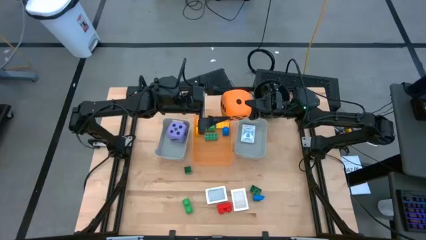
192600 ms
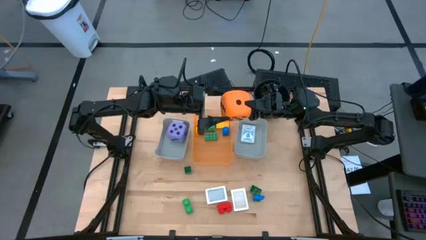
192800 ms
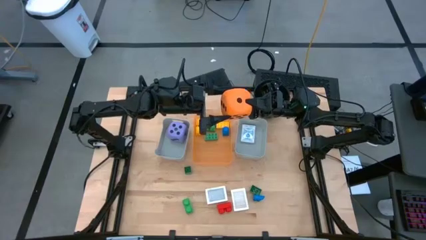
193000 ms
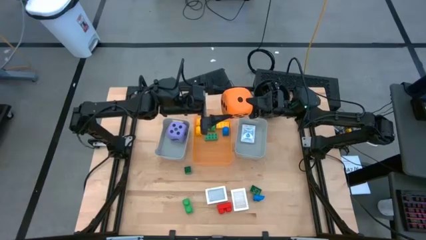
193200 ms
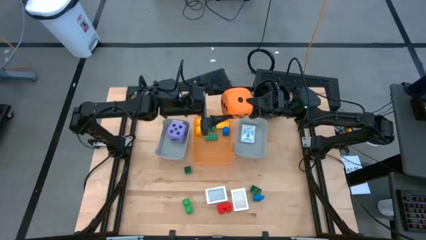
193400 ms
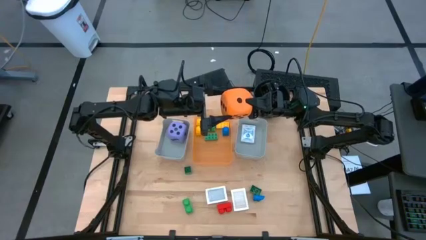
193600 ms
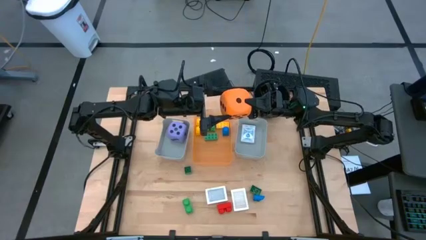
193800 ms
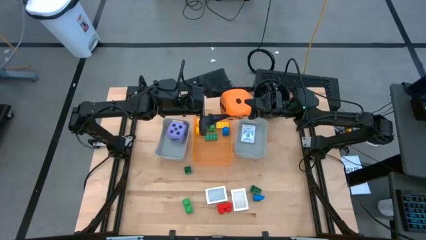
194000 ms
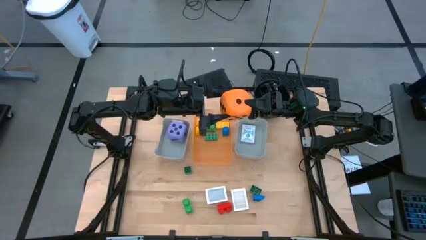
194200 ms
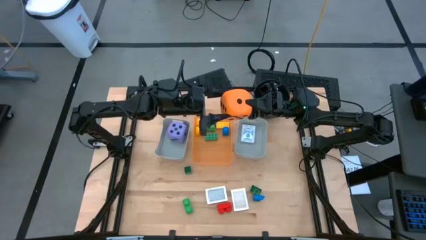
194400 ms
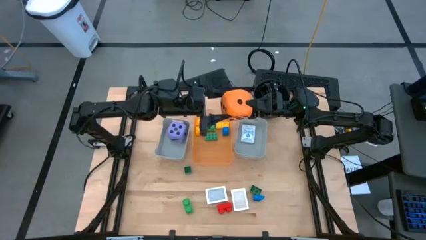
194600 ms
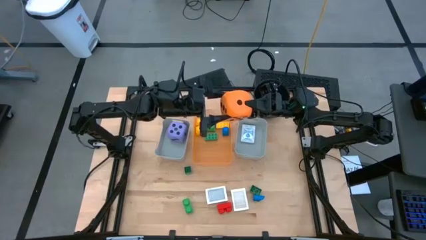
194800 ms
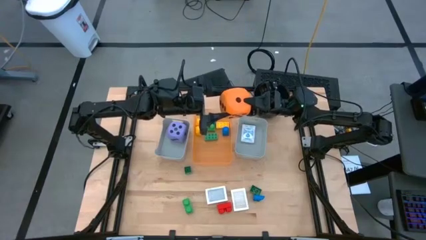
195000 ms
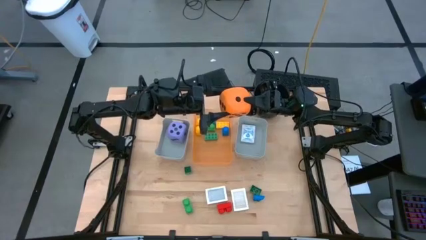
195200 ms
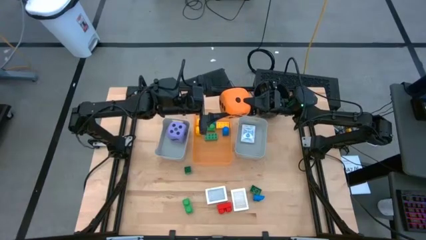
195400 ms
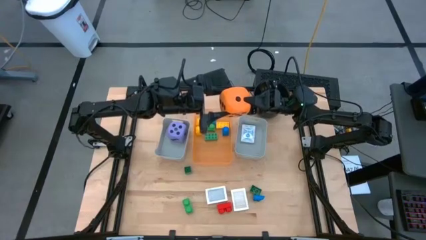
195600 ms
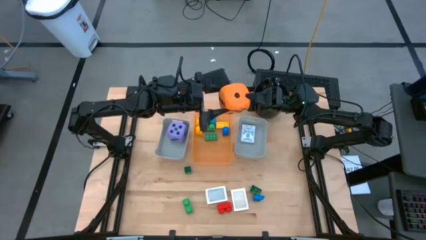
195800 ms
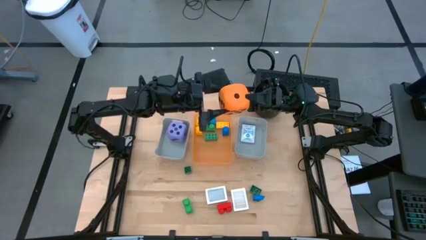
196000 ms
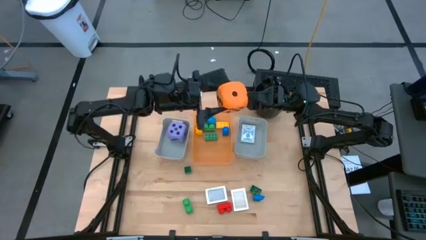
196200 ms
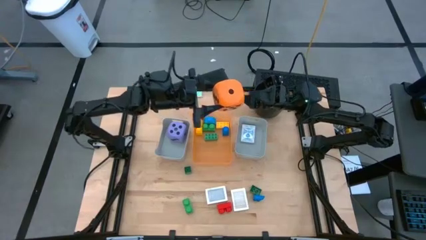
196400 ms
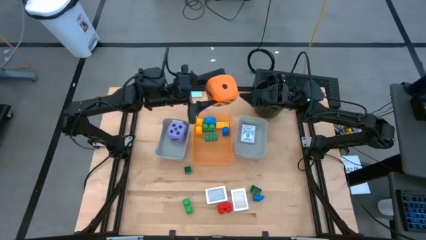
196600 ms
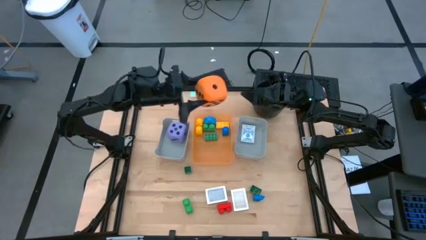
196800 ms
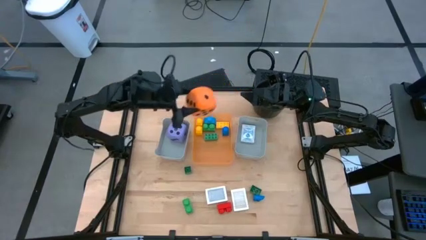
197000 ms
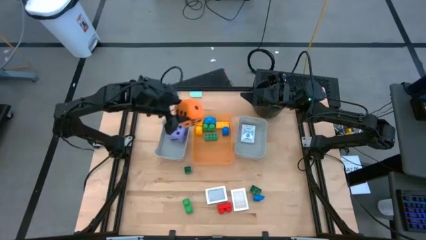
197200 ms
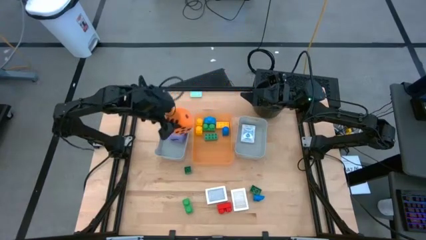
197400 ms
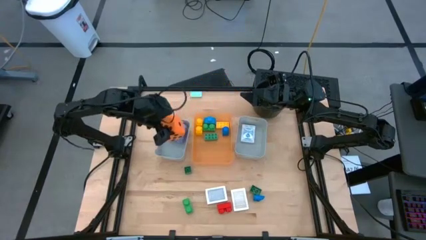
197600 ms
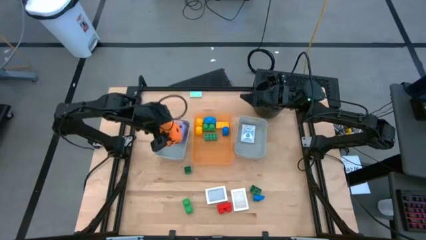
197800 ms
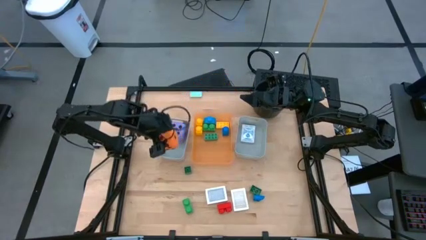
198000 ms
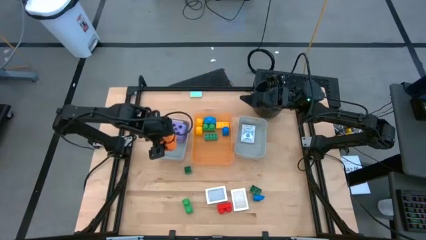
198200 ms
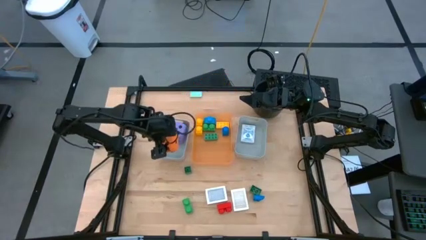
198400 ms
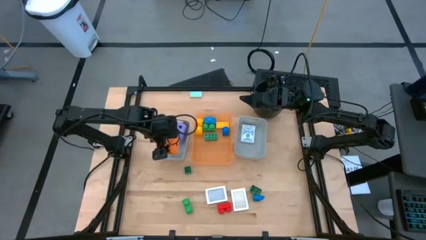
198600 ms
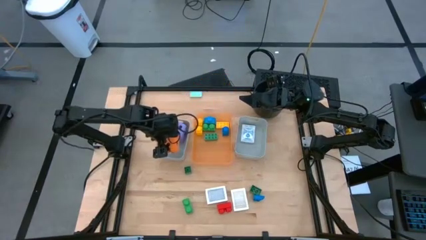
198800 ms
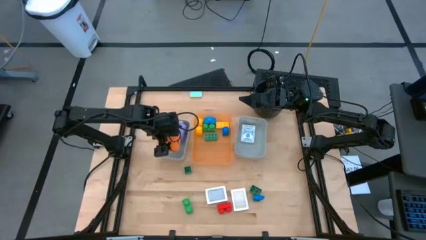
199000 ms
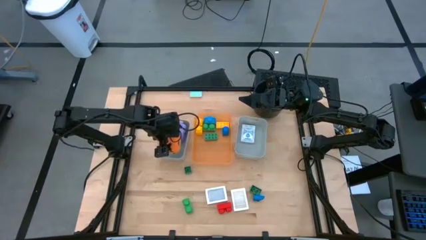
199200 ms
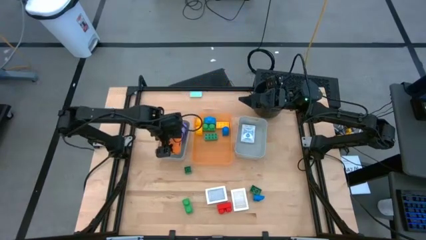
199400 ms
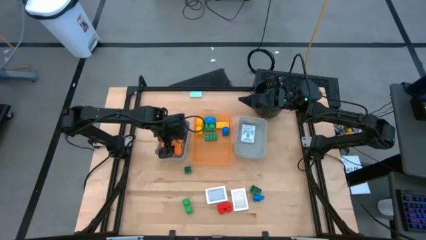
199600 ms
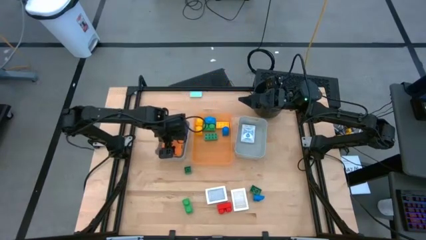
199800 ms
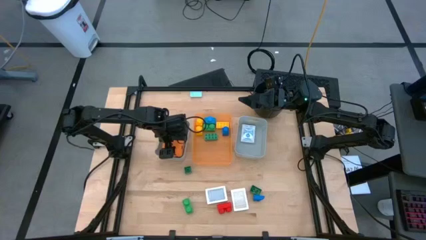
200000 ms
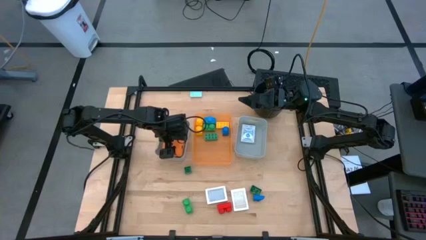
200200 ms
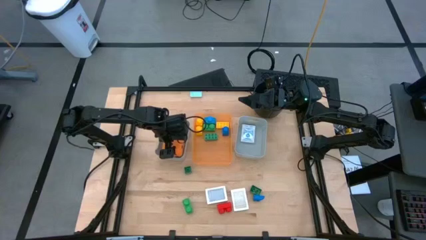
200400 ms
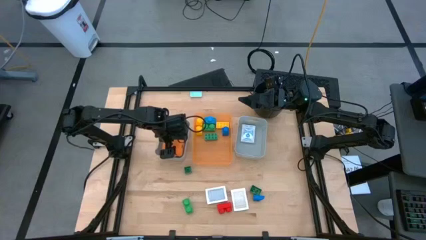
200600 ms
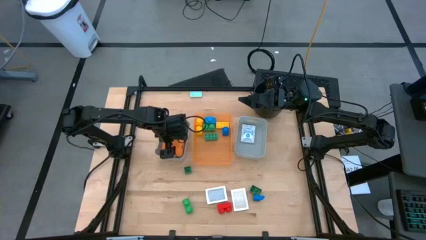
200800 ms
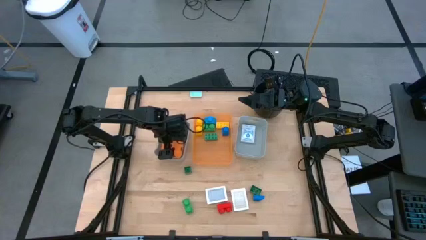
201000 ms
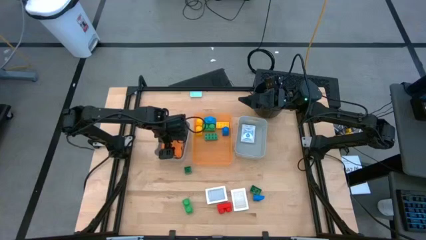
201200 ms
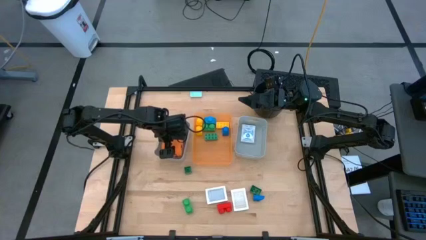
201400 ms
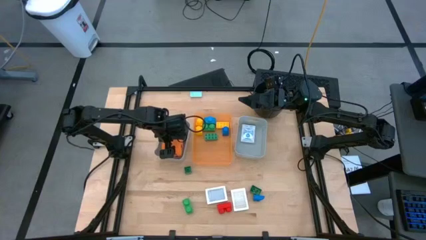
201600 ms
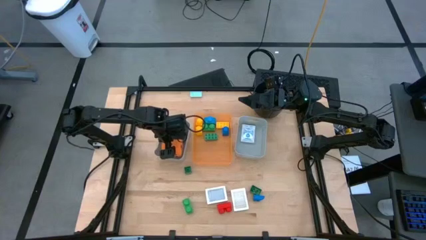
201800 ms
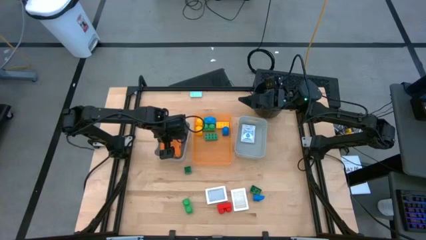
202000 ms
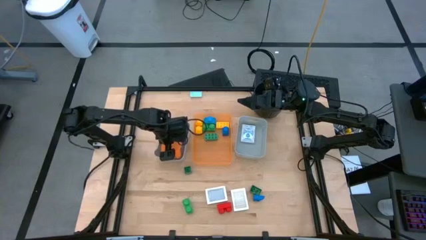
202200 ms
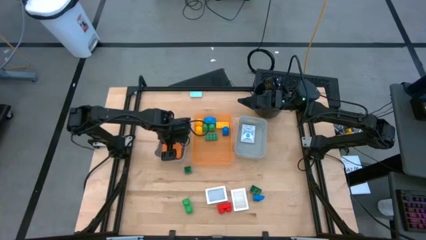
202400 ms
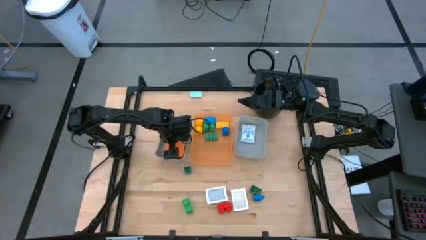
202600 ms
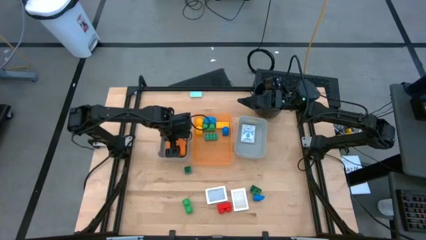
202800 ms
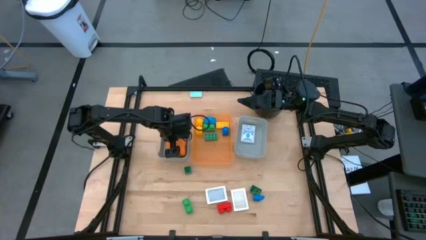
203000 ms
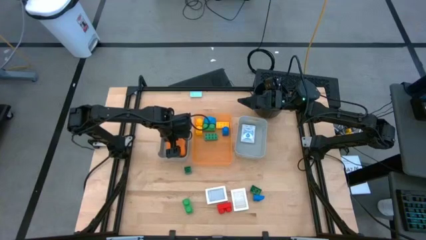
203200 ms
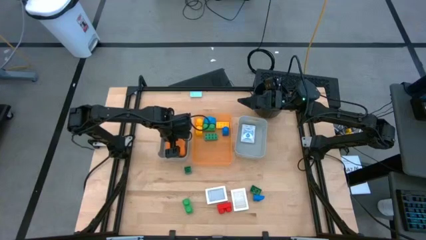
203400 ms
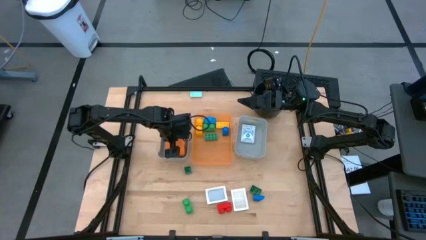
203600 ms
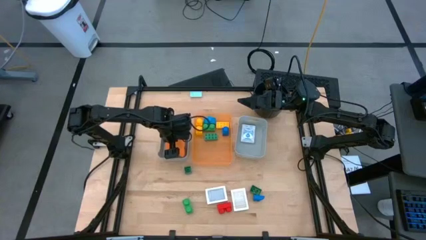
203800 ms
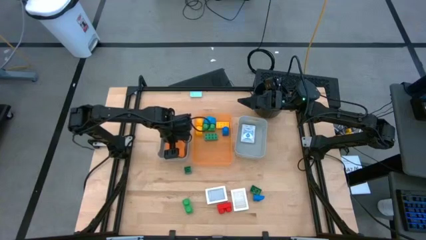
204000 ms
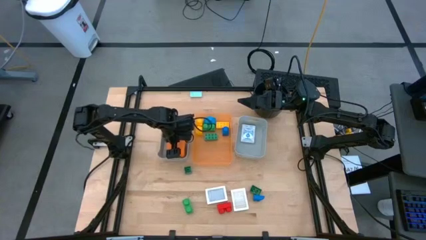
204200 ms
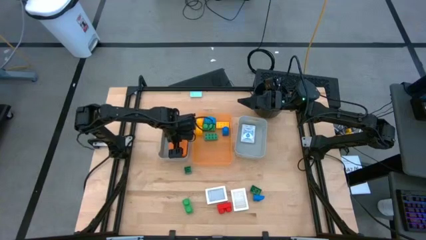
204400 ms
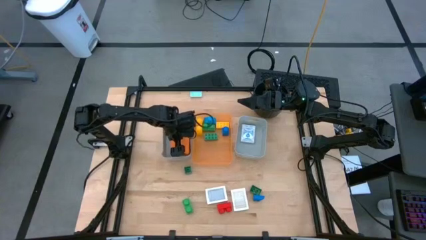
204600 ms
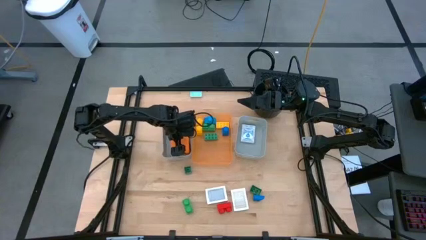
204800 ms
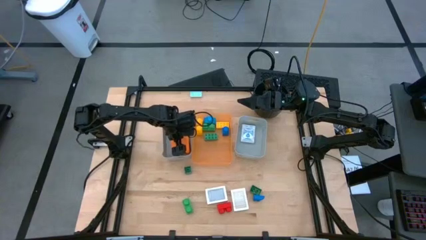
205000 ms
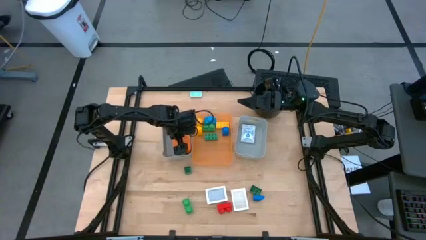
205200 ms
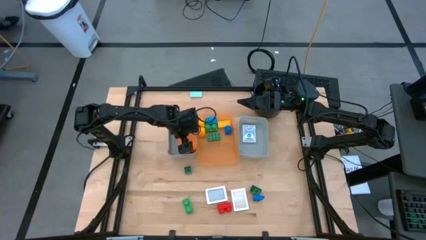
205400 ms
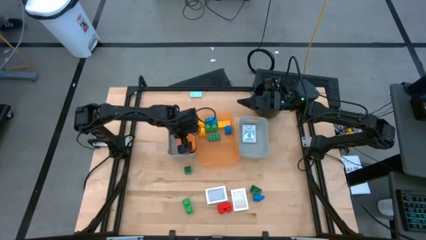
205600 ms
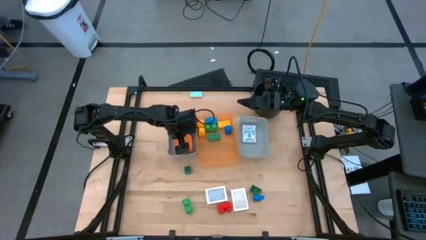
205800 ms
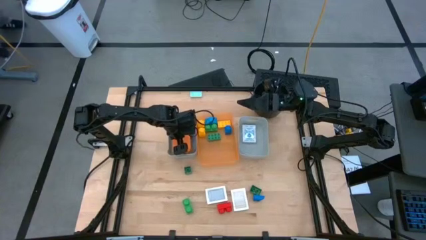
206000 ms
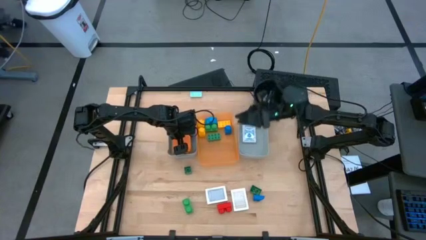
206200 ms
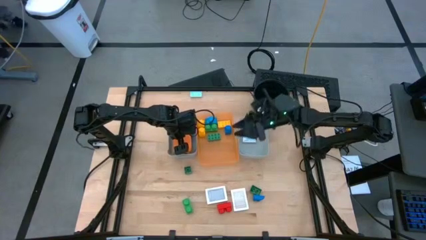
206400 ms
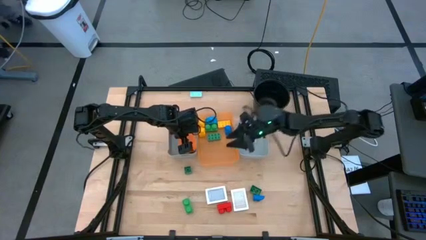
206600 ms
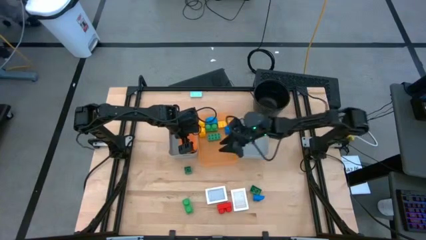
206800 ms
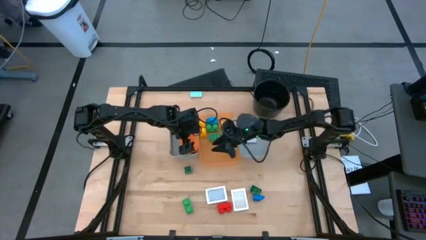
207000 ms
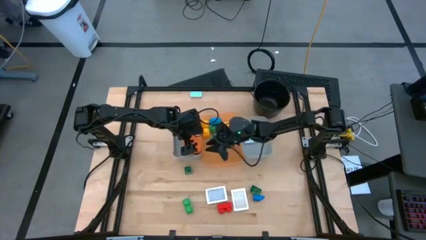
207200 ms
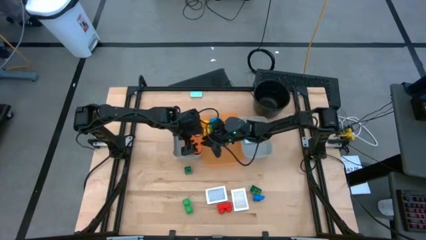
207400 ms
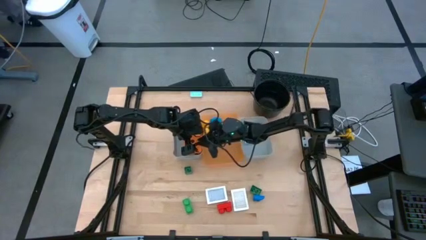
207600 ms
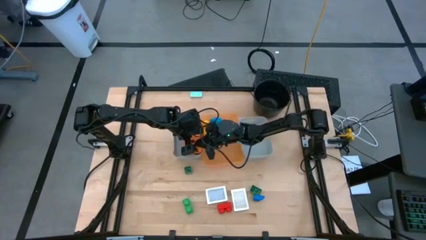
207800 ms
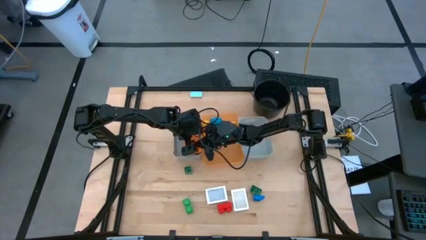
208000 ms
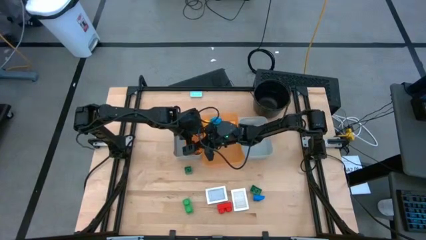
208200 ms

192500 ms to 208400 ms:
Task: Pick & Place Toys
Put the orange dice into the left gray bin
